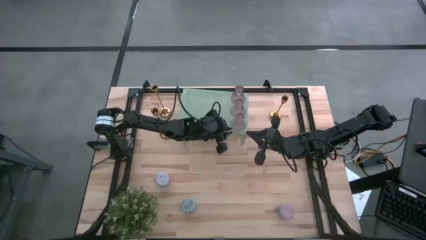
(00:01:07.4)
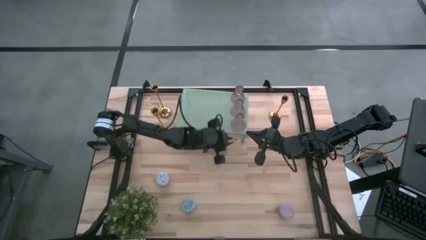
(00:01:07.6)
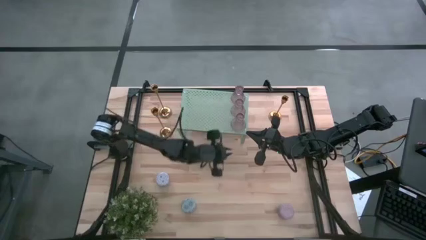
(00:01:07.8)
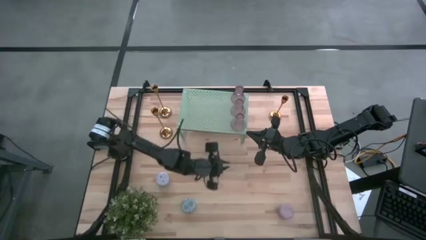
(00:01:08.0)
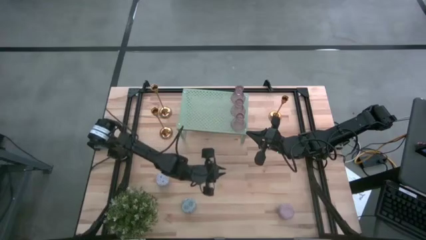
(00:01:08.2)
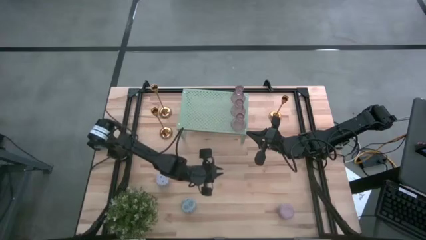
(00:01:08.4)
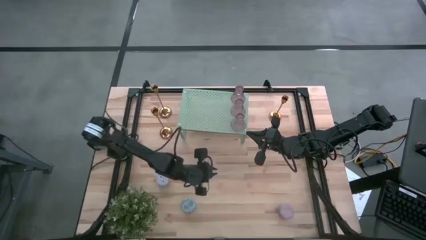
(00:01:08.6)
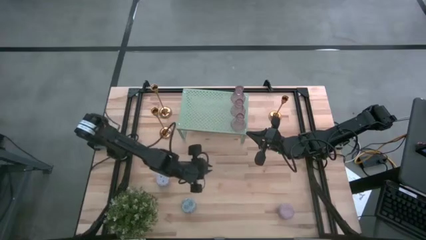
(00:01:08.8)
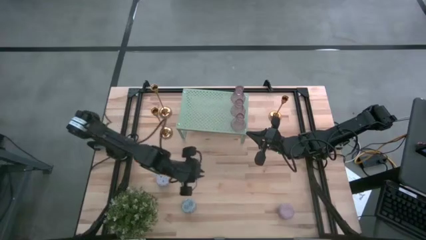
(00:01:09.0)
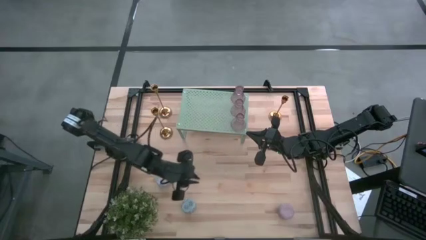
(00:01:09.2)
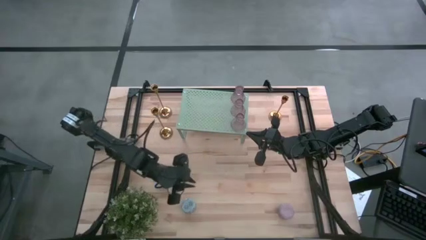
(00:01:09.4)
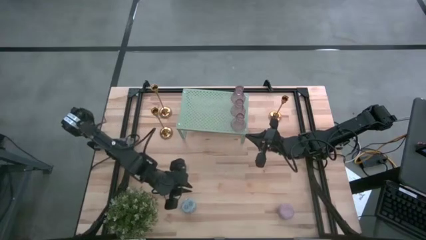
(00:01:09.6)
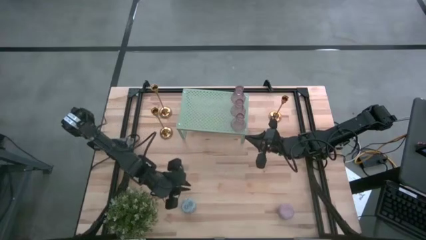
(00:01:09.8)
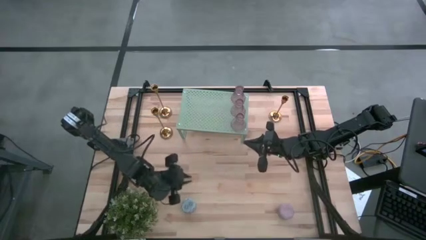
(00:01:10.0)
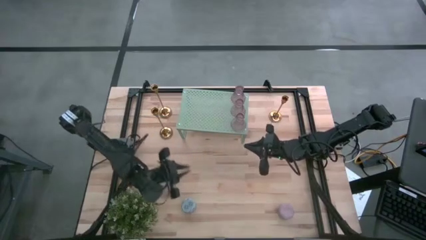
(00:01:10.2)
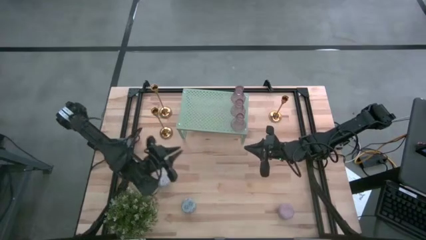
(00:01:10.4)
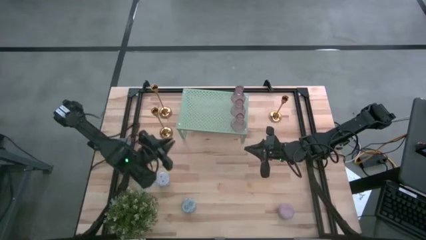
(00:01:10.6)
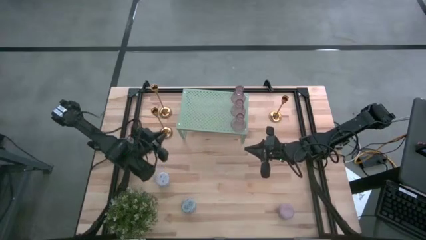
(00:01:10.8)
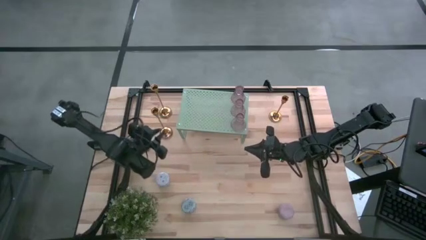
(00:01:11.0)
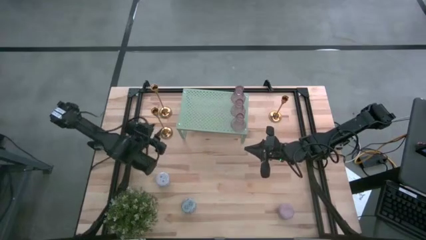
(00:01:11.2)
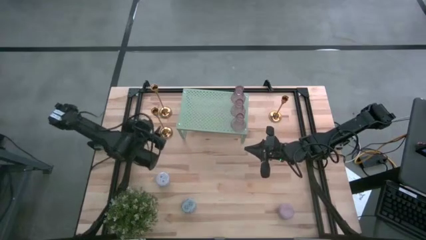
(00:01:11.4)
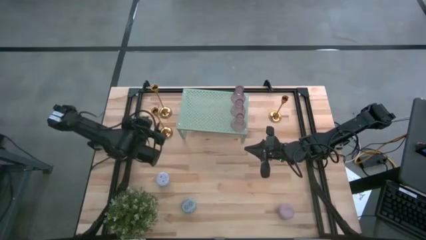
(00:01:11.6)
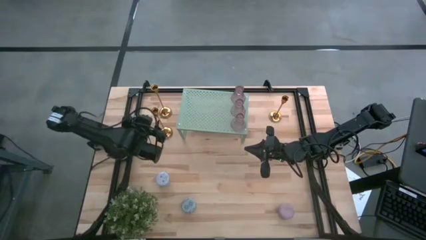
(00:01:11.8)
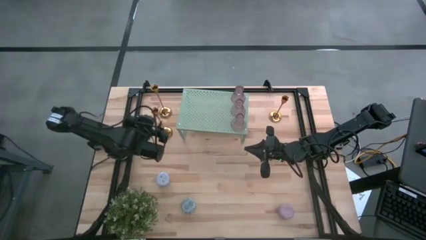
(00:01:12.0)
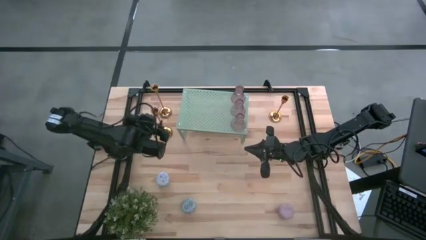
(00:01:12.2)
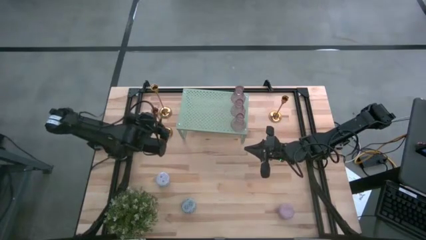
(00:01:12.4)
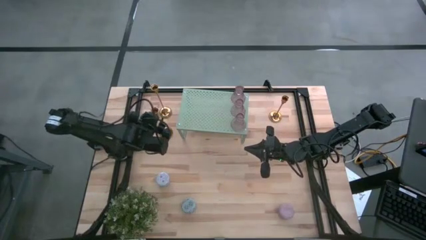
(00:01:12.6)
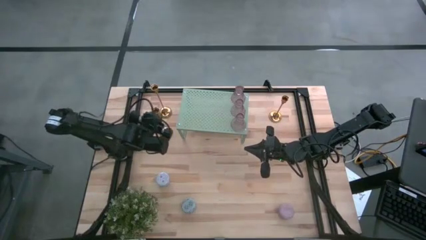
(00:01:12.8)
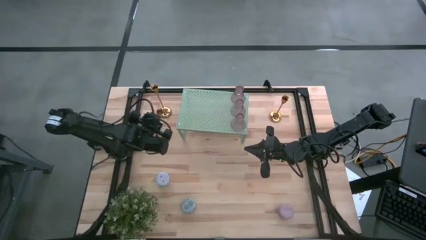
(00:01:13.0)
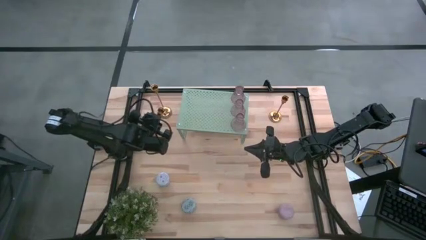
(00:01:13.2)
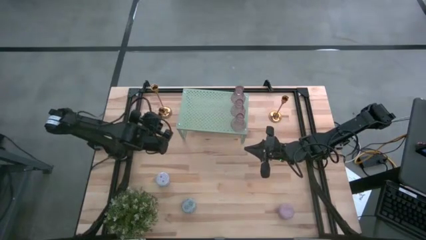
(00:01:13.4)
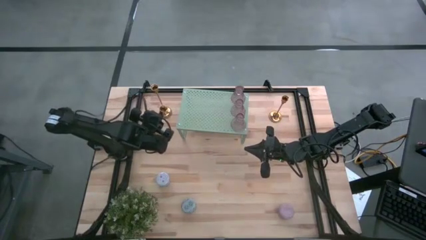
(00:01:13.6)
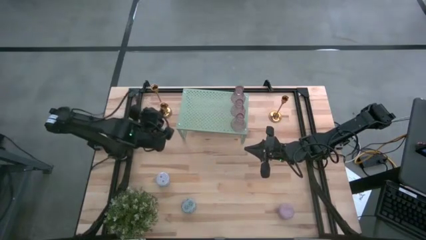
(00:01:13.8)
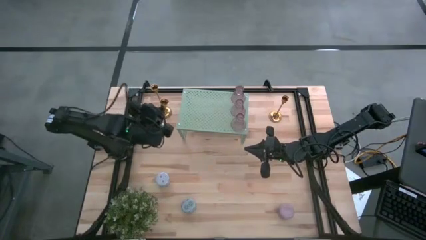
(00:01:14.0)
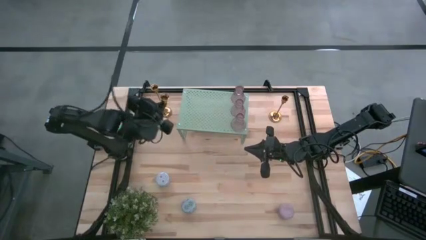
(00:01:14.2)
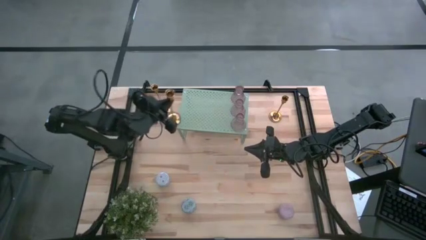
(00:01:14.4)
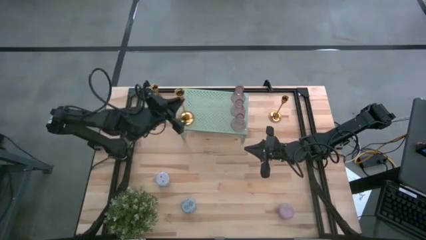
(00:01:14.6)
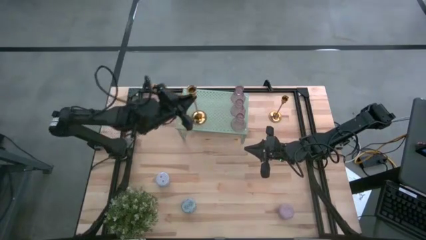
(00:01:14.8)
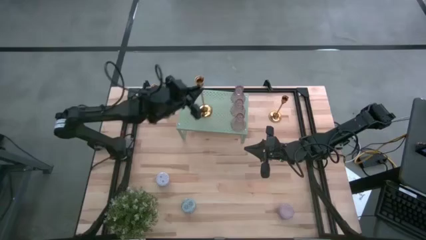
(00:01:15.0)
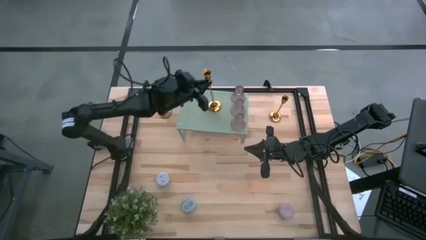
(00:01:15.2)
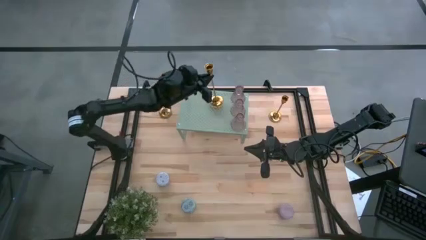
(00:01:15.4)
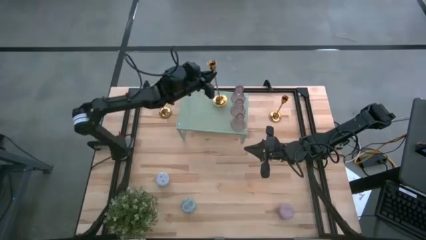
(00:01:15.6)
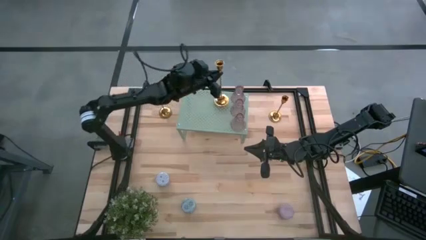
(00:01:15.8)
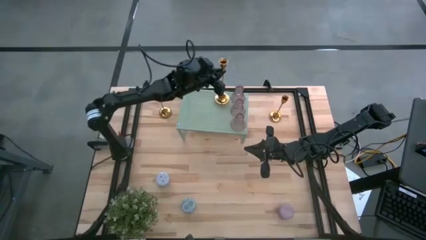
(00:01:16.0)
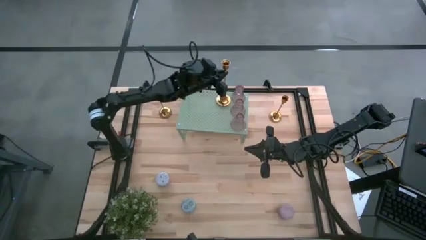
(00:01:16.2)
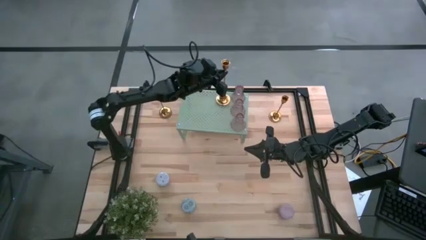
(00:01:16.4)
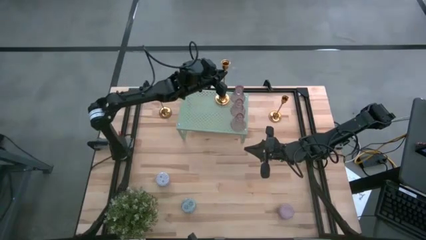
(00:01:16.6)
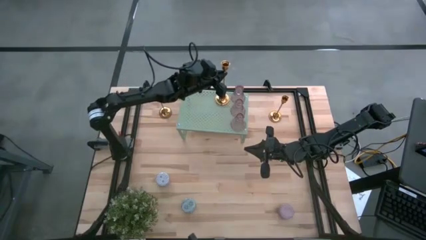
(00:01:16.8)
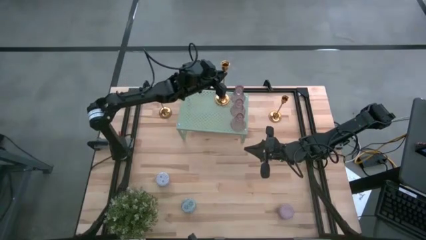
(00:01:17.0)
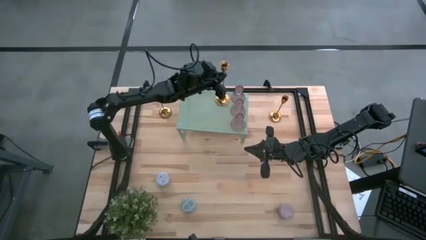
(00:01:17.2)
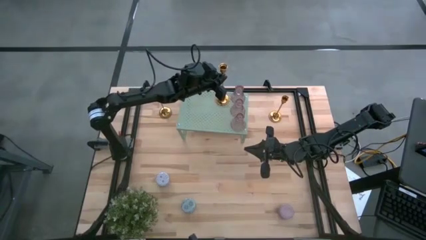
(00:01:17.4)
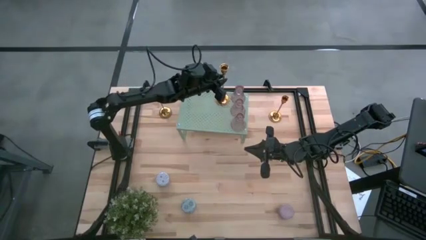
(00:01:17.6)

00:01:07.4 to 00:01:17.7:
Task: Pick & Place candle stick holders
Put the bottom left gold candle holder on the shelf

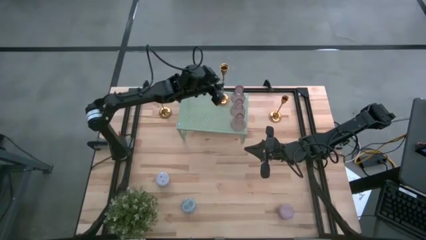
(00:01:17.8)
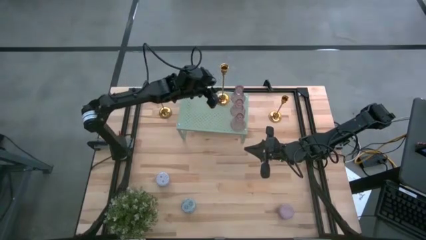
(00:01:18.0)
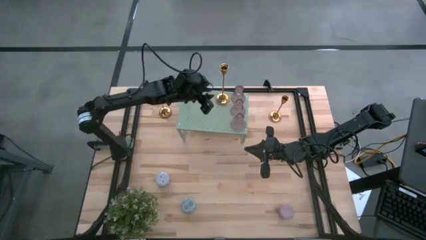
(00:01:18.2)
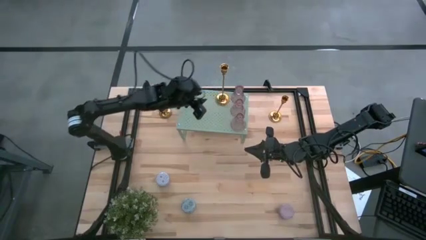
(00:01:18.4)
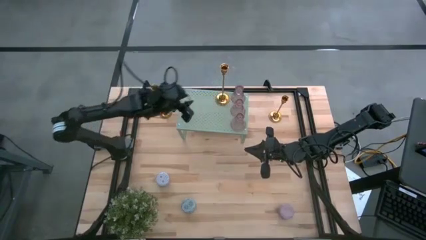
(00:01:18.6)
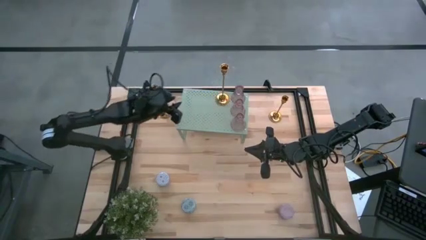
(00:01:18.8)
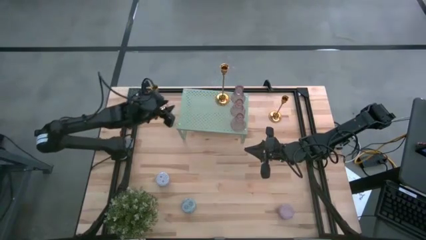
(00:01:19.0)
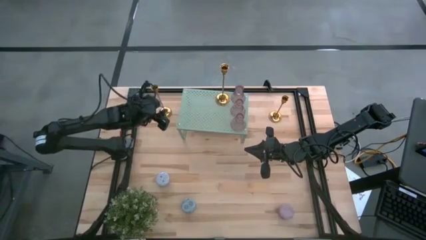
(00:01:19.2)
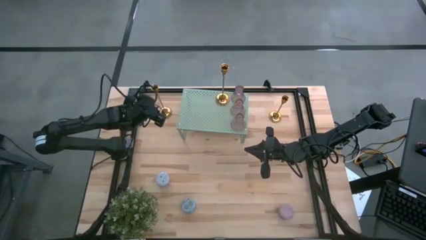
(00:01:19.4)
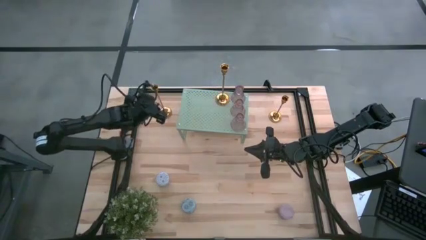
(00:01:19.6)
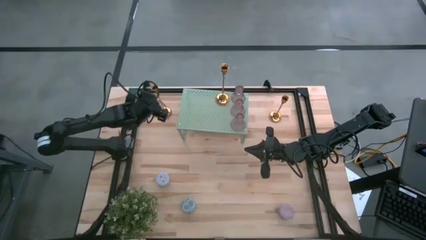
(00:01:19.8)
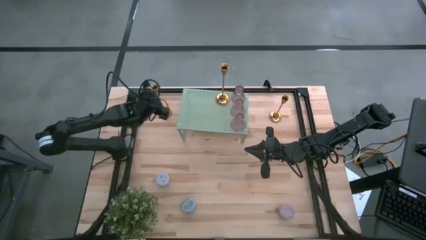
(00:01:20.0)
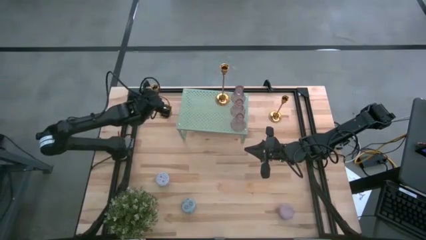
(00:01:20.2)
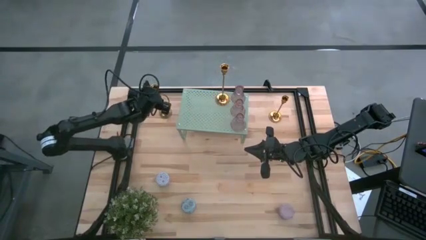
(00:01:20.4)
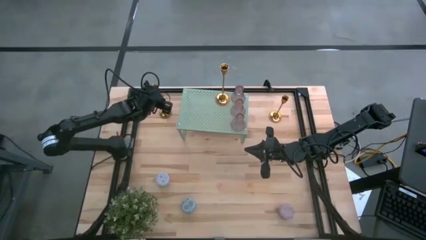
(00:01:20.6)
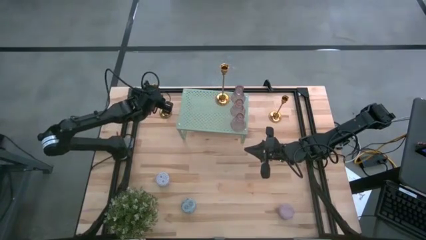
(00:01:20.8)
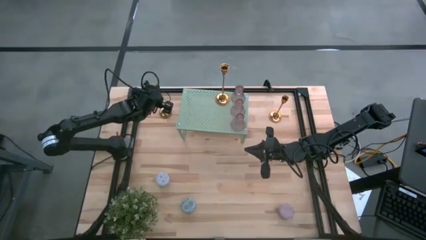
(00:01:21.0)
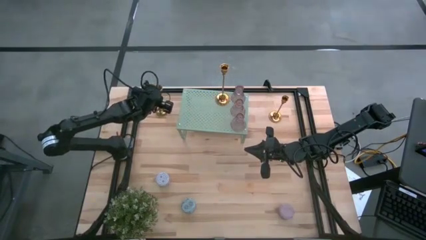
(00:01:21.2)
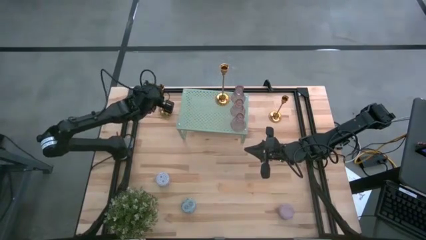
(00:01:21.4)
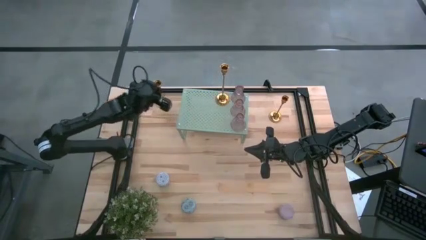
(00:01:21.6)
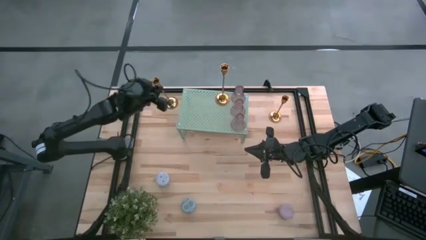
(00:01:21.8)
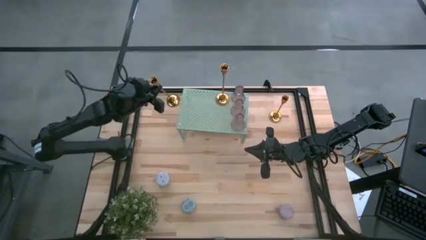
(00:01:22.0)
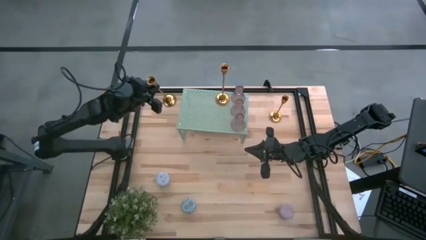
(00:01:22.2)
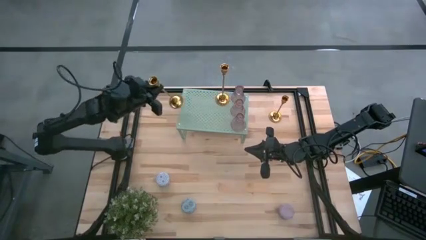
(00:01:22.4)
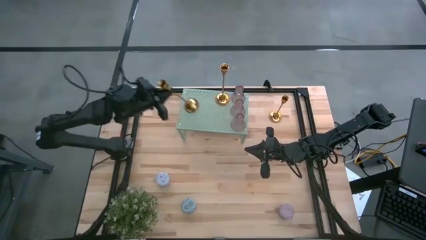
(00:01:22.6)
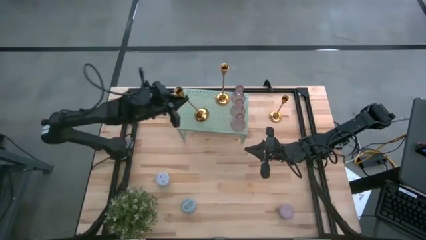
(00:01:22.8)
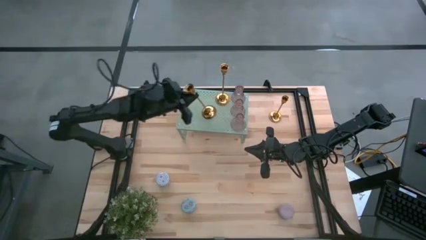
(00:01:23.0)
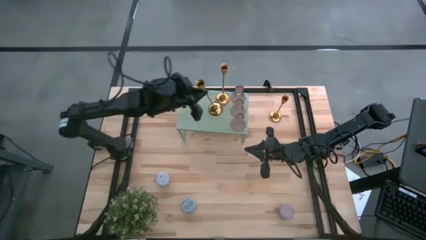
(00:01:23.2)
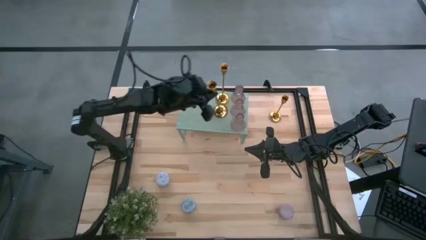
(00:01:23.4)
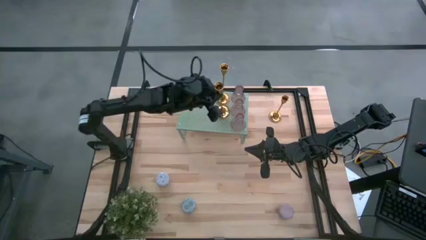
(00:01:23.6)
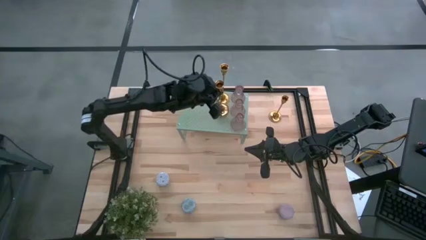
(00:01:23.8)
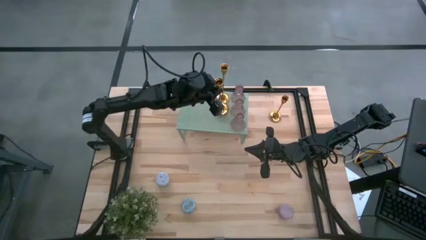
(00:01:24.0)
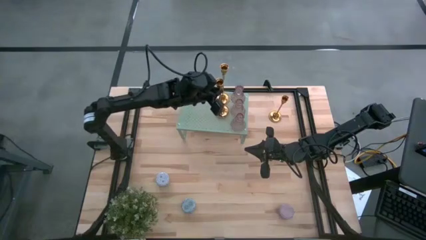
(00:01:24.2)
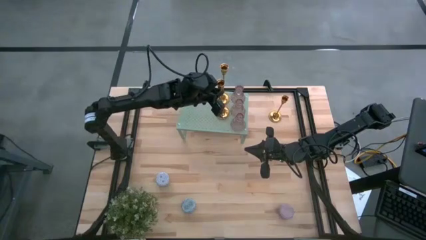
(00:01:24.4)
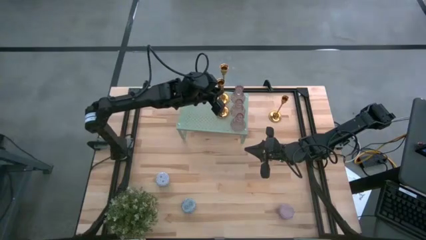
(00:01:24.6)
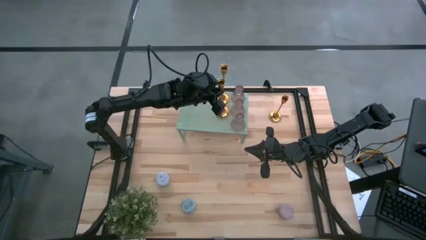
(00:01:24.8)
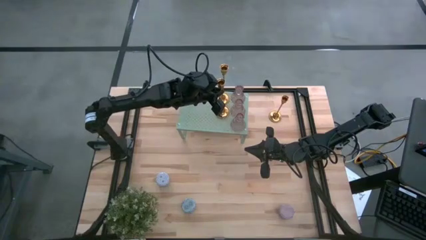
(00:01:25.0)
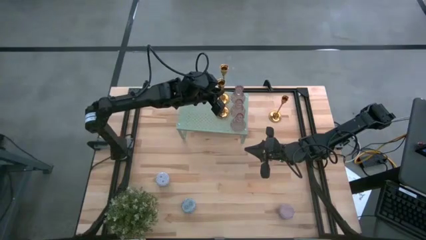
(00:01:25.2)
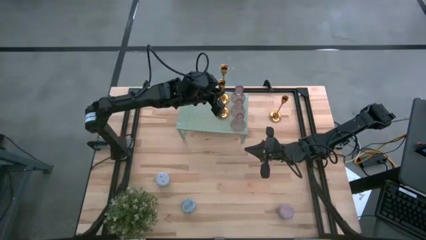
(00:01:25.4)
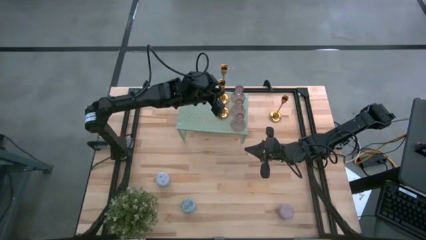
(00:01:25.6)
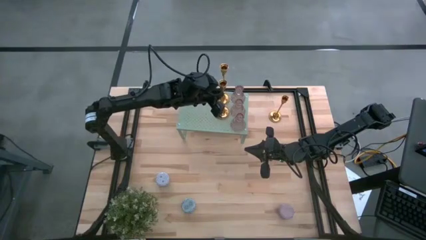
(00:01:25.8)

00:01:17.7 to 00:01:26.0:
Put the left gold candle holder on the shelf aligned with the other gold candle holder
